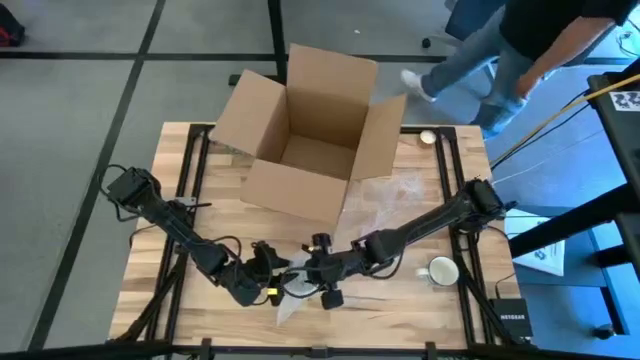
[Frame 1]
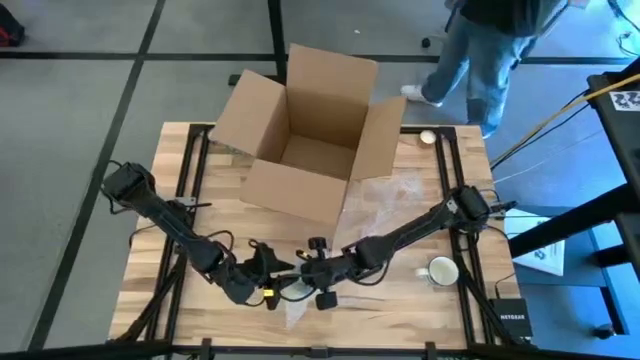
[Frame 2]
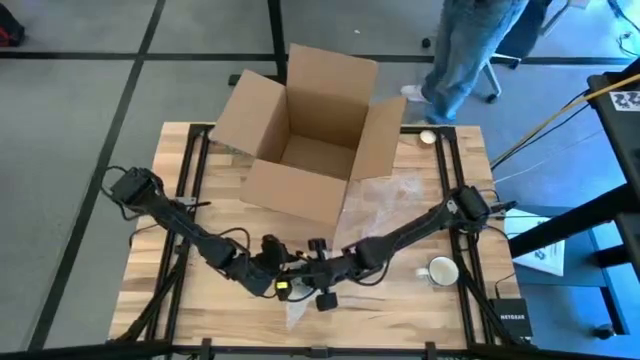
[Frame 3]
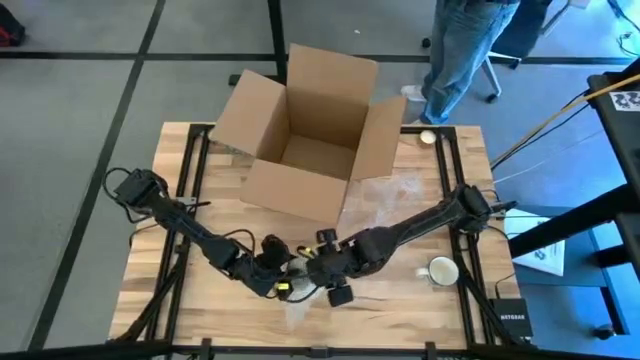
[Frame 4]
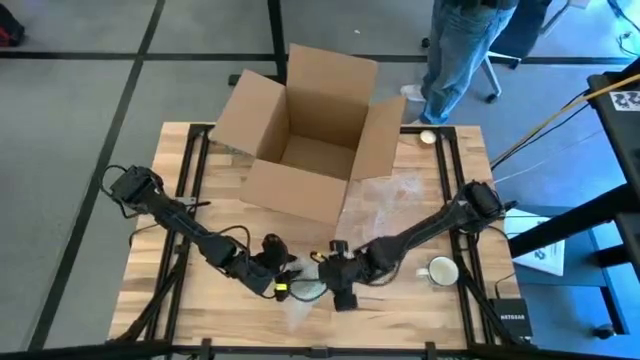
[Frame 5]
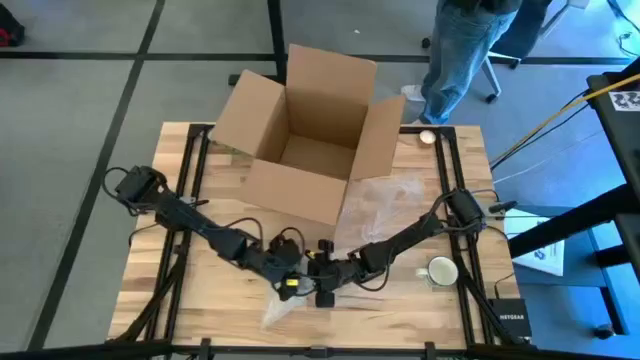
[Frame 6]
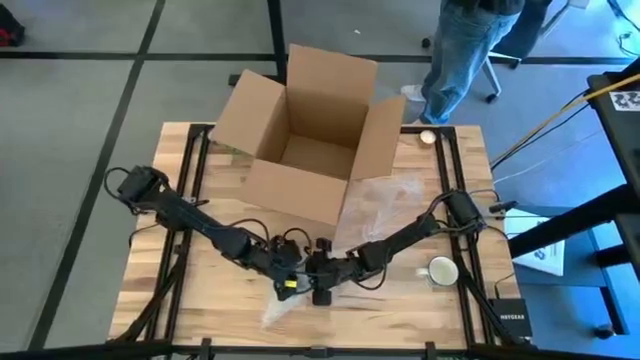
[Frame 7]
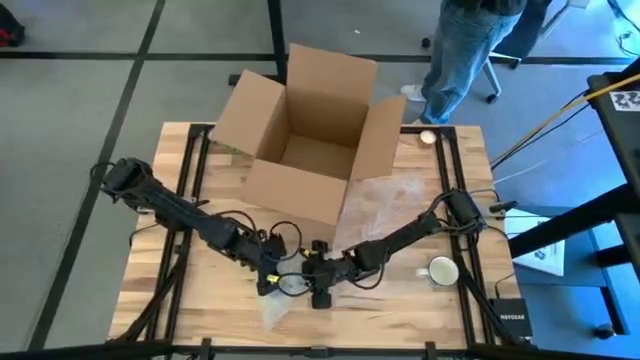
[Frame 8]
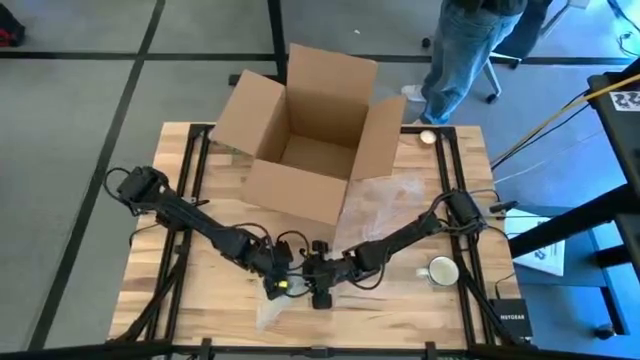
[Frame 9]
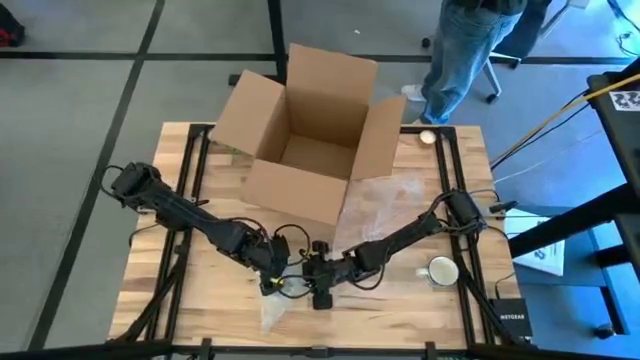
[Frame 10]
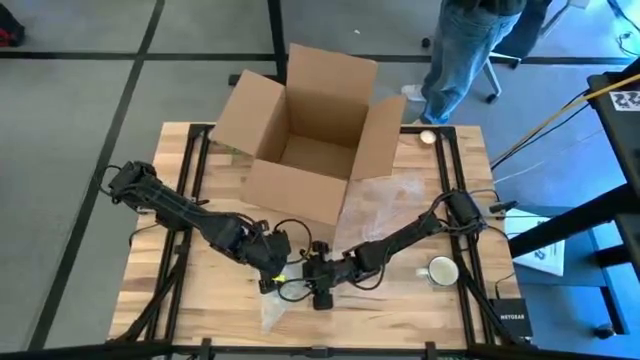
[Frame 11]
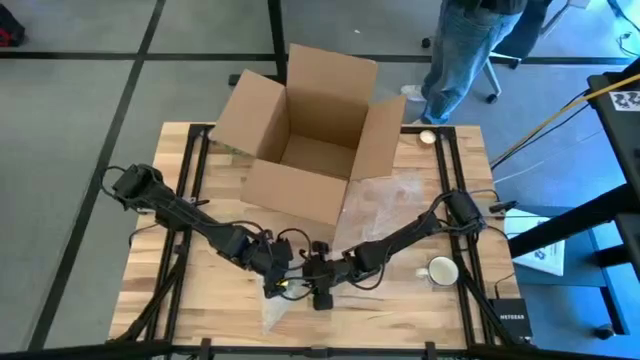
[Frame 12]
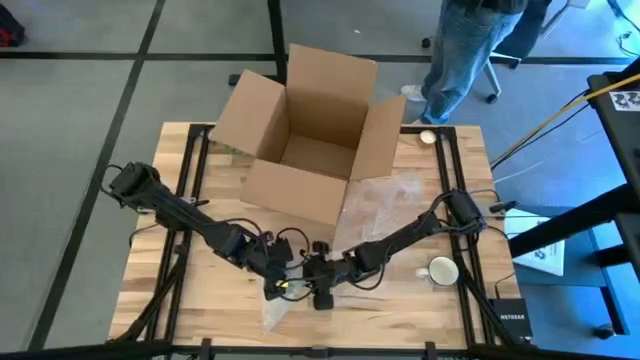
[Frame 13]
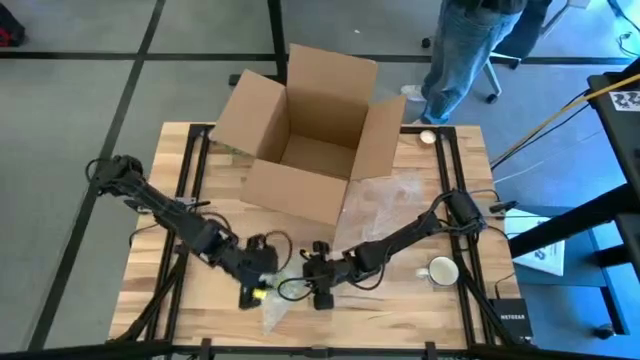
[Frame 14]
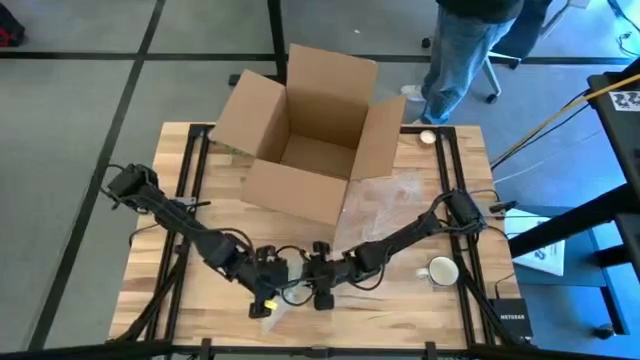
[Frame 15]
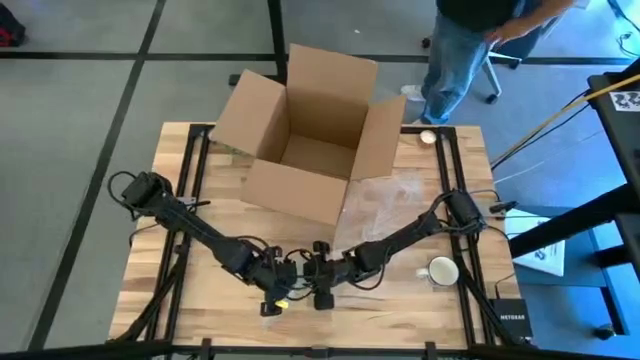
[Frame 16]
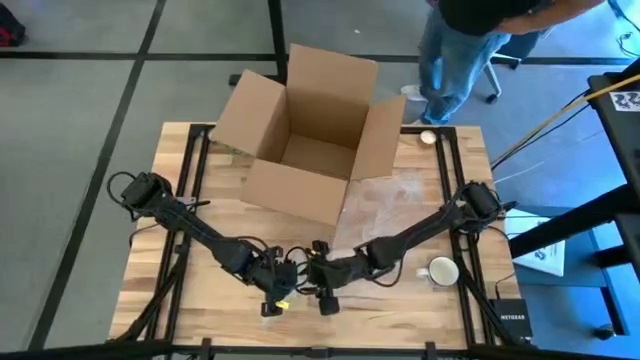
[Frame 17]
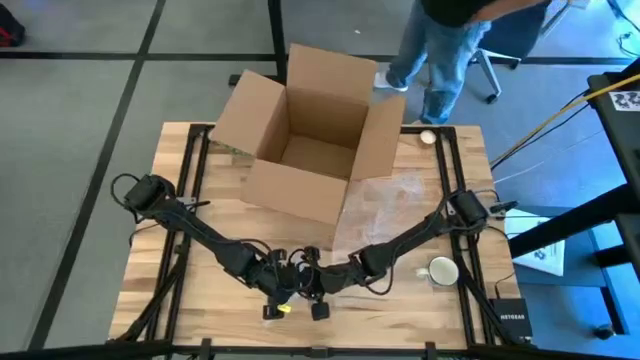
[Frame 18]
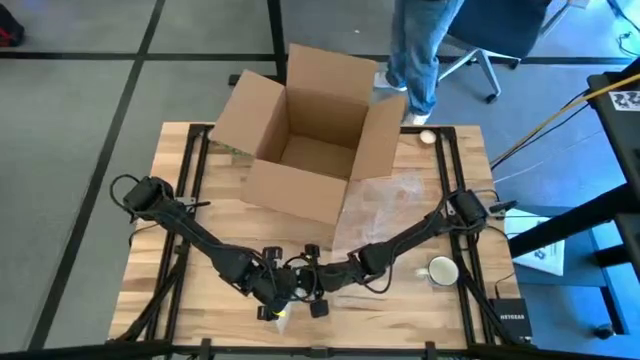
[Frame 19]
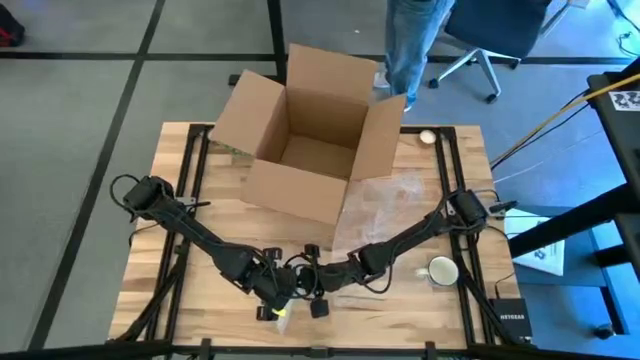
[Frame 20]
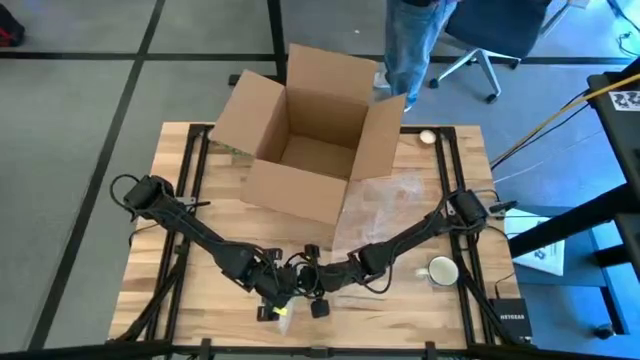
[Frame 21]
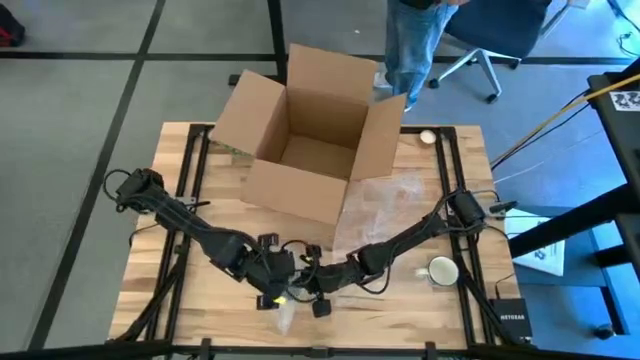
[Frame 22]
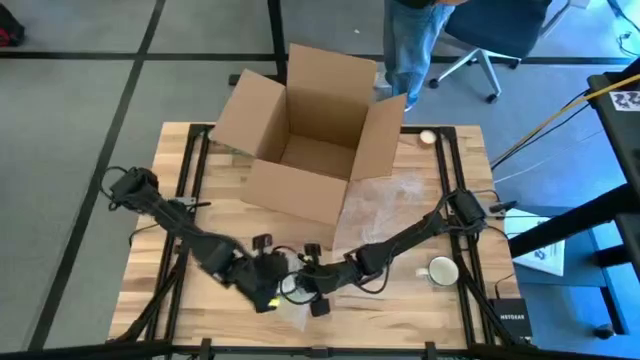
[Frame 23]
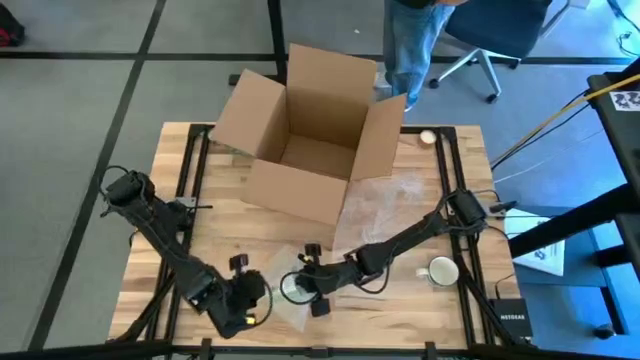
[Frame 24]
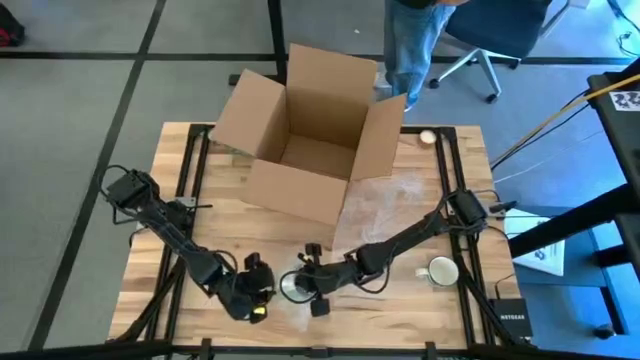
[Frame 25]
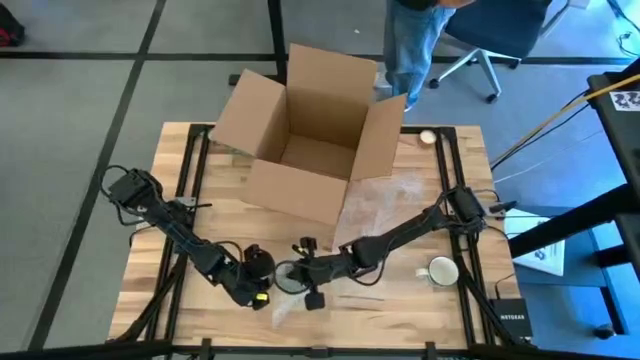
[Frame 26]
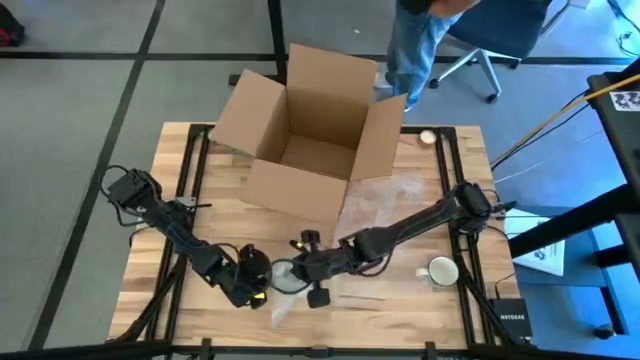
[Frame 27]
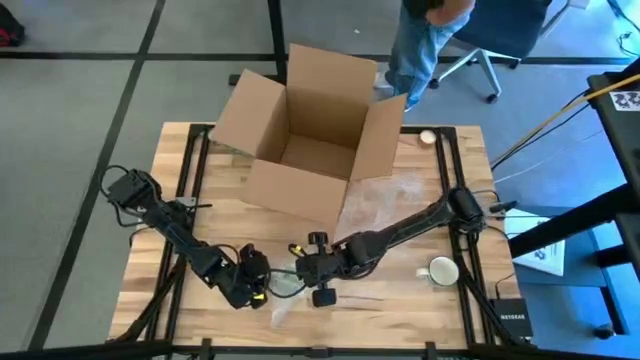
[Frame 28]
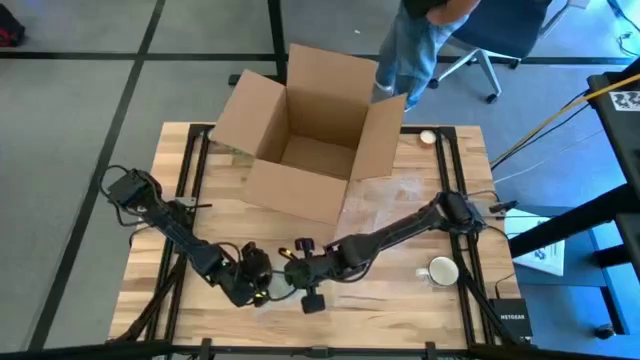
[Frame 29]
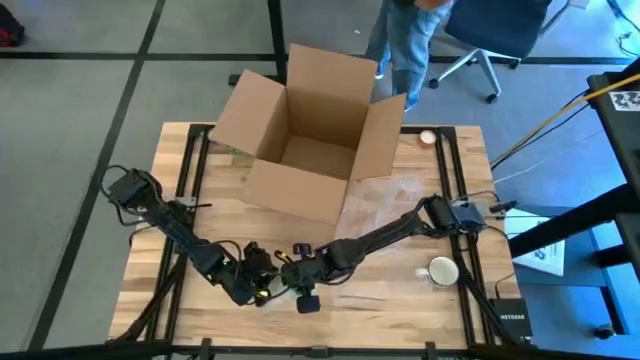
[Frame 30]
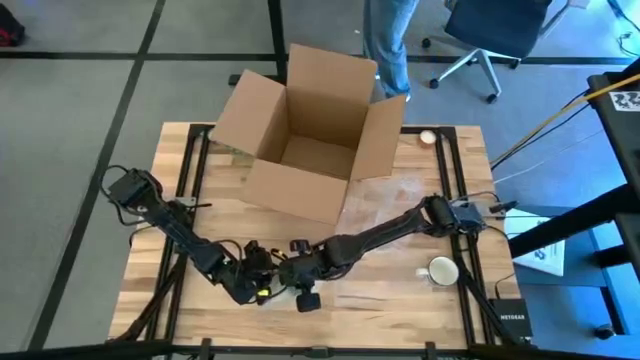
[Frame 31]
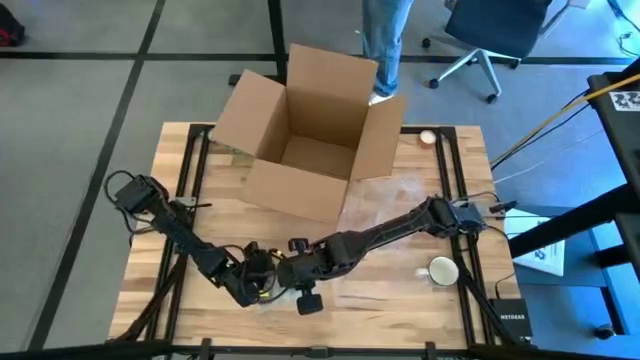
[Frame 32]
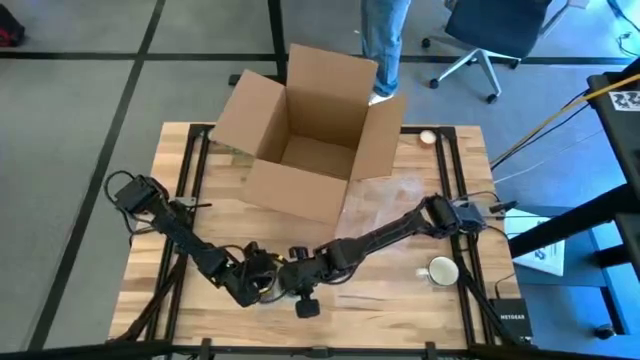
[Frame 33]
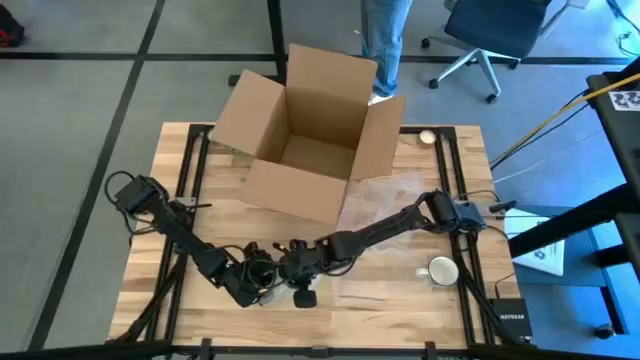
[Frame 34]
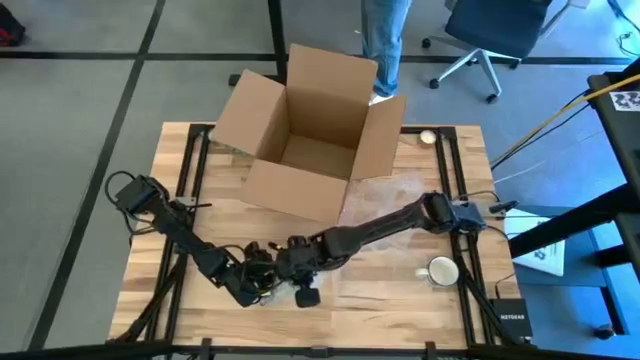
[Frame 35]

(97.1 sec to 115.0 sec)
Task: wrap mug
Wrap the green mug with bubble wrap

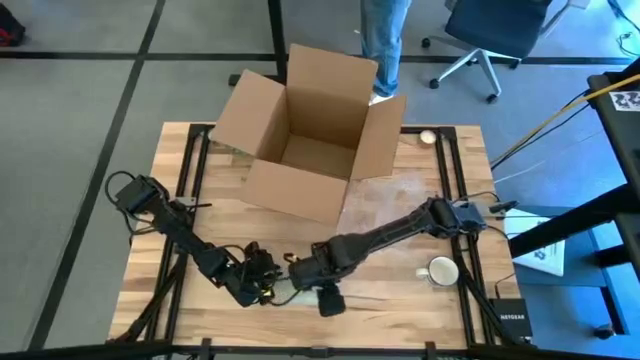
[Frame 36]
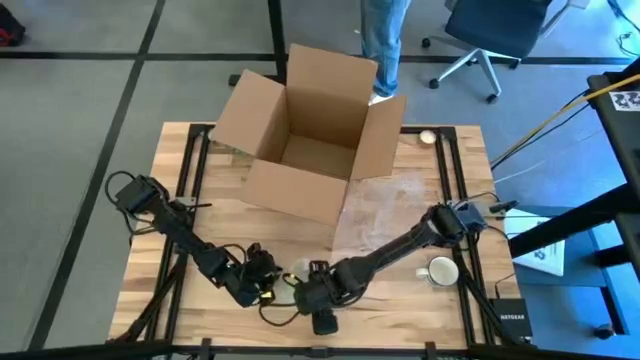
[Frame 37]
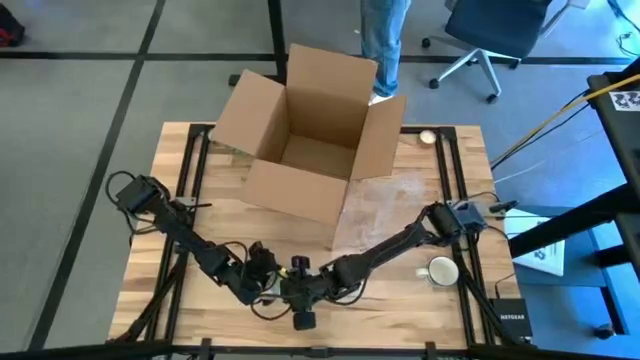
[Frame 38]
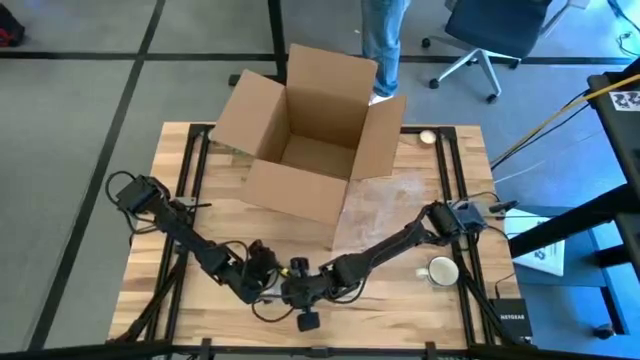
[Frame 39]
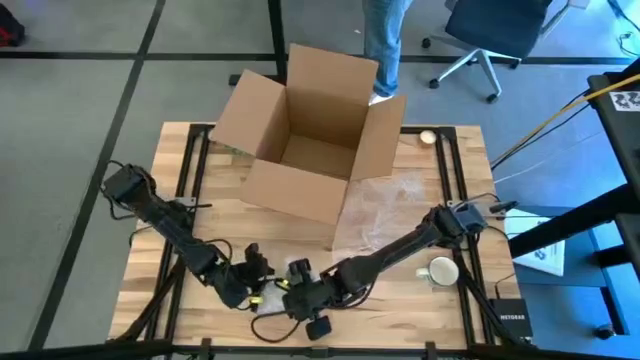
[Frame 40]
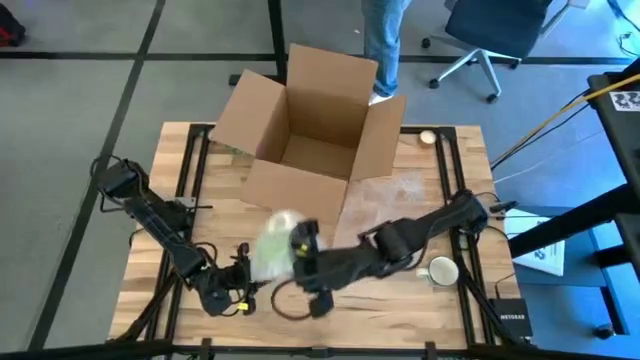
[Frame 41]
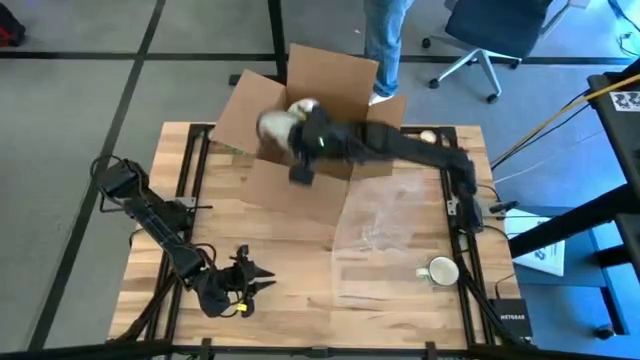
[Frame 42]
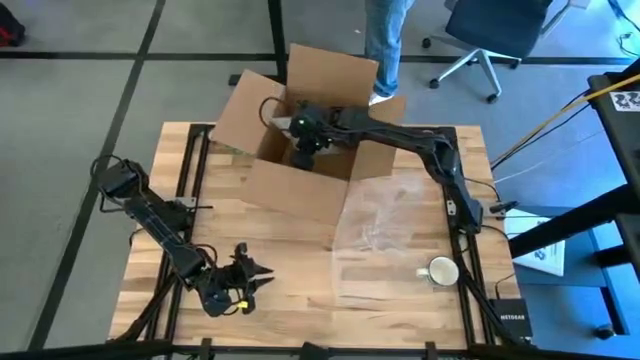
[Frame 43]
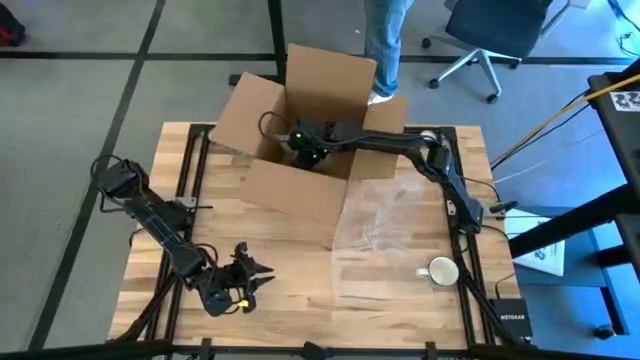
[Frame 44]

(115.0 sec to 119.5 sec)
Put the wrapped green mug into the cardboard box
